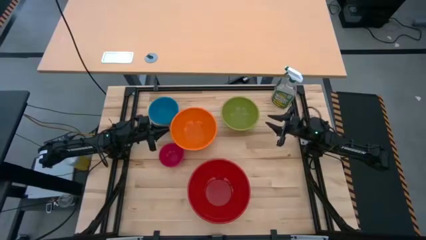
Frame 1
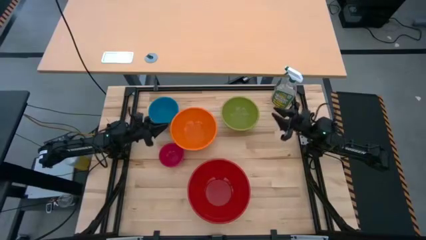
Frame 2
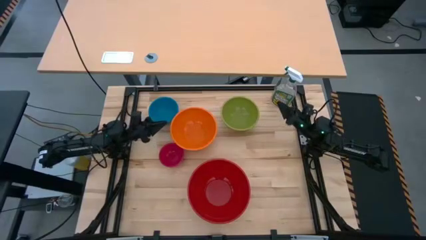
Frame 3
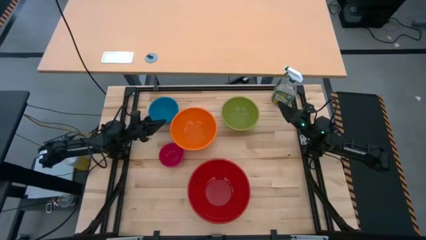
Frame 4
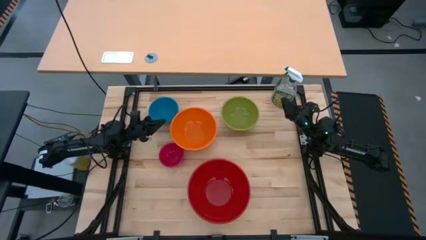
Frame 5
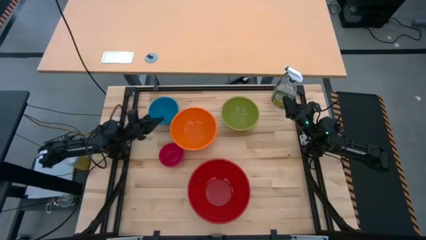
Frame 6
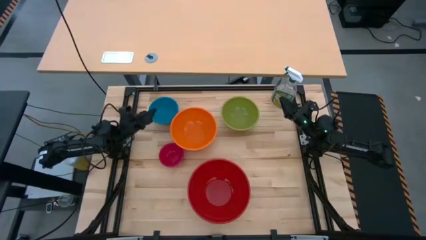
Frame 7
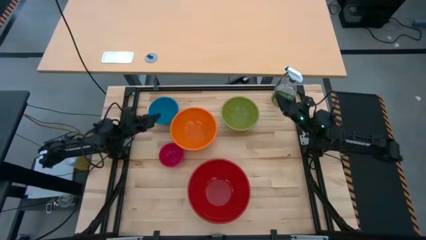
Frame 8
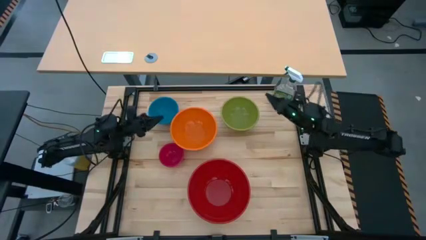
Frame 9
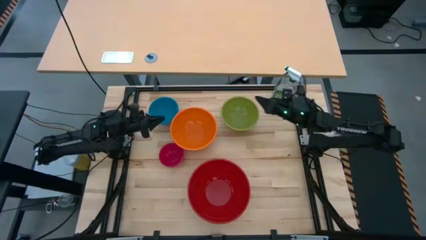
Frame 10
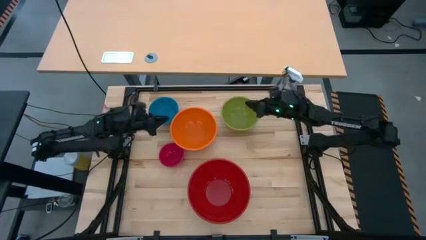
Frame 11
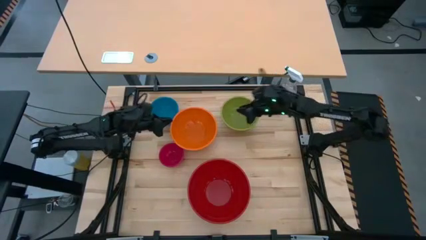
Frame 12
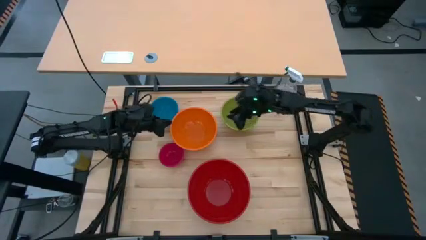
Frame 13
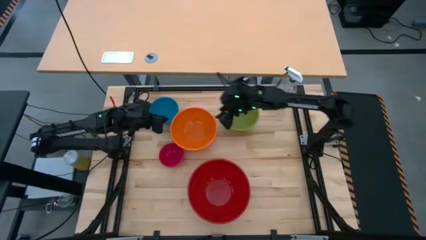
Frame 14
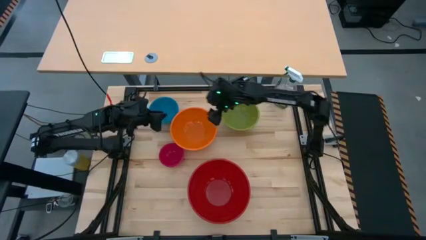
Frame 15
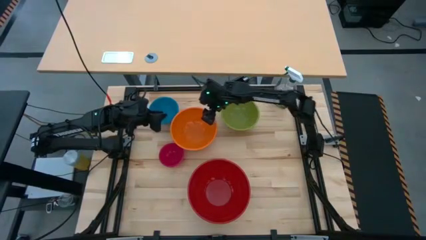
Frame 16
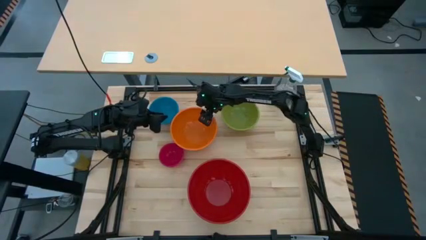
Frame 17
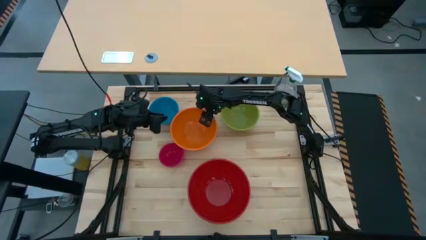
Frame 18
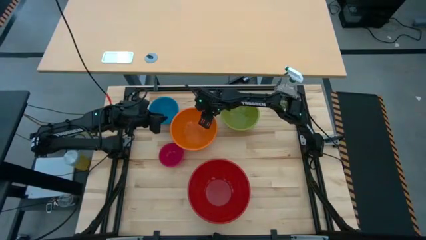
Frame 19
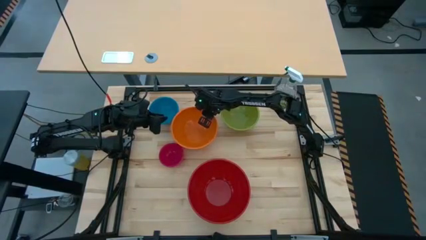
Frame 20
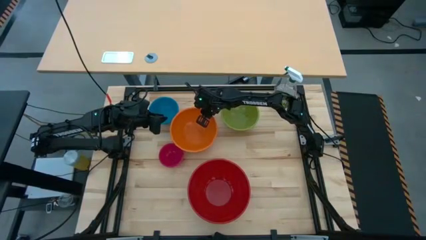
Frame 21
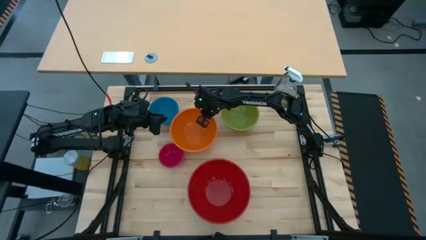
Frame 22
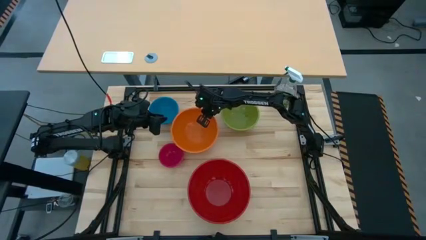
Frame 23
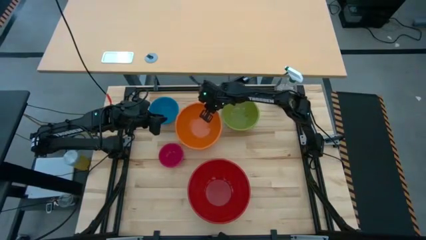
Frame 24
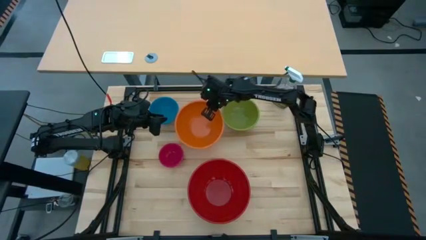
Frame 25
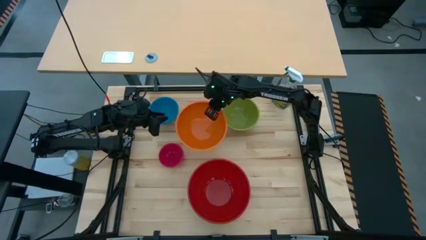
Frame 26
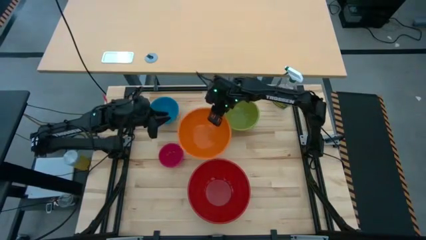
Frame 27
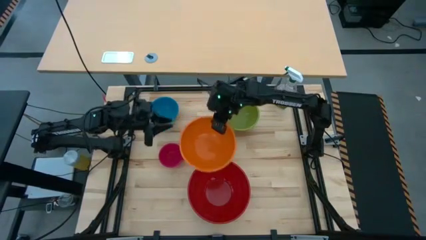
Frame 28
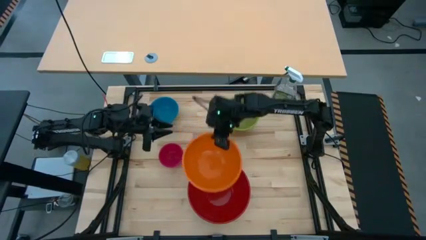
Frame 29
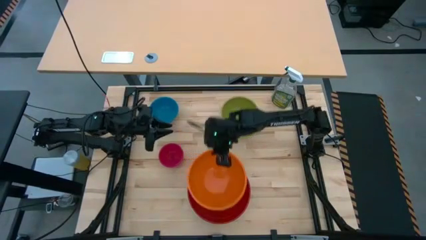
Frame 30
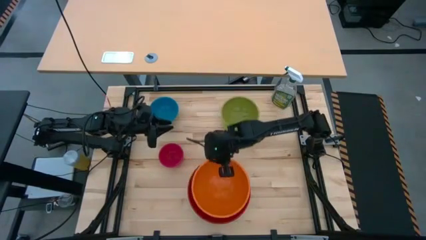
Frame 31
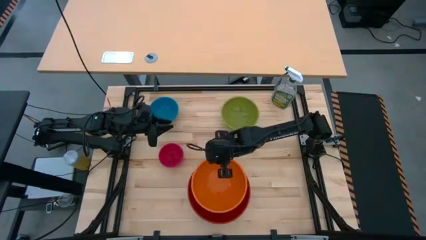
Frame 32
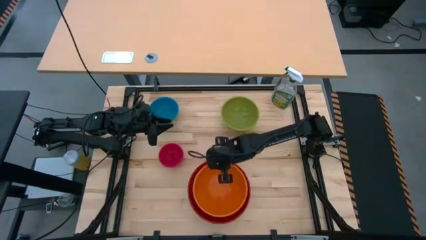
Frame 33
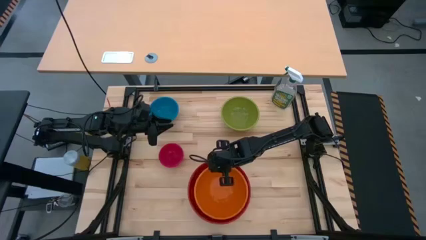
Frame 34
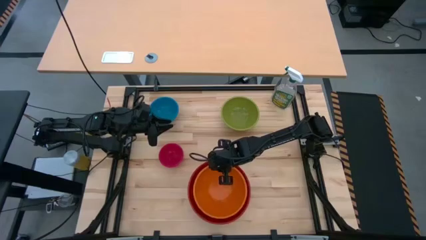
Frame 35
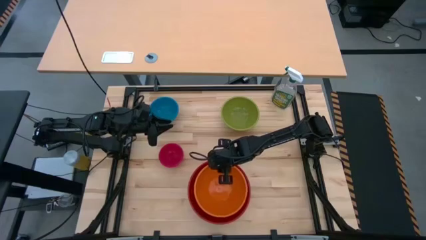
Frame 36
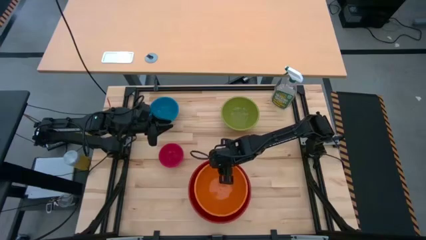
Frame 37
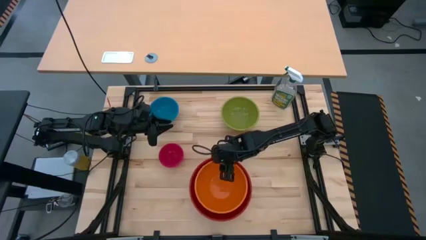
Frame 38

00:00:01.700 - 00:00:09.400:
Stack the orange bowl on top of the red bowl

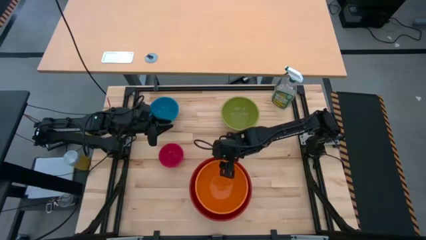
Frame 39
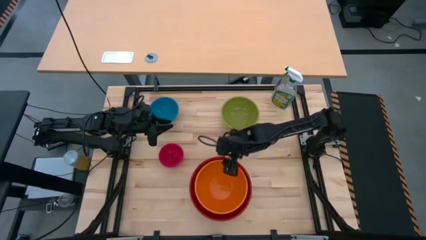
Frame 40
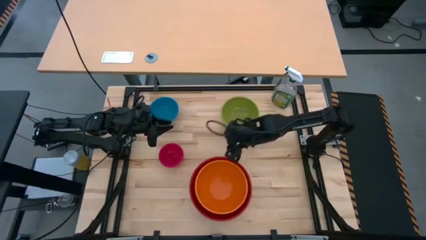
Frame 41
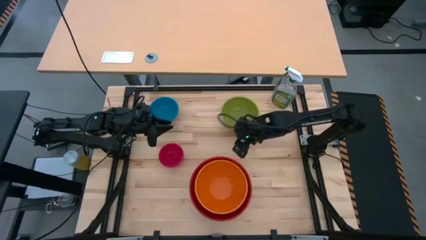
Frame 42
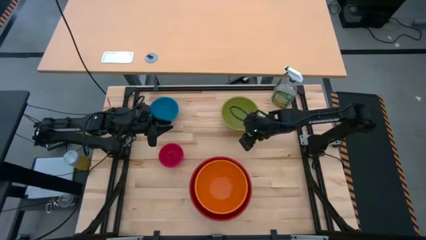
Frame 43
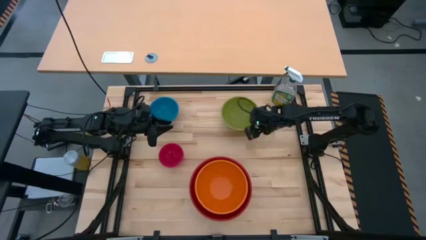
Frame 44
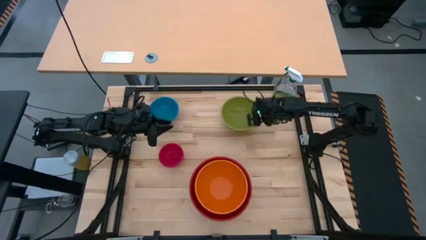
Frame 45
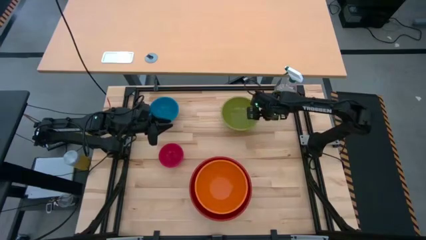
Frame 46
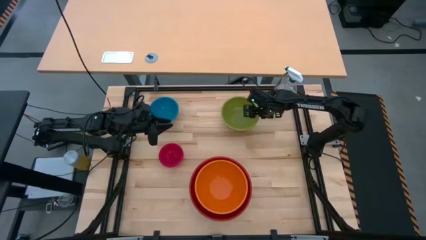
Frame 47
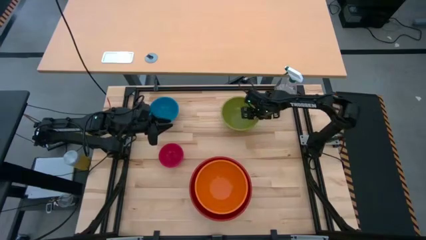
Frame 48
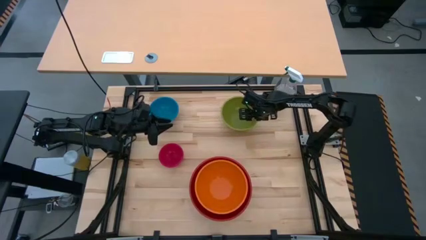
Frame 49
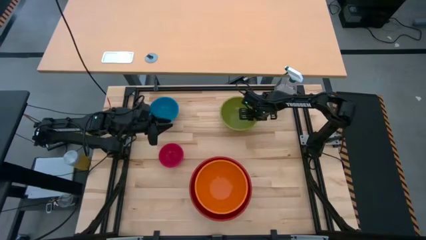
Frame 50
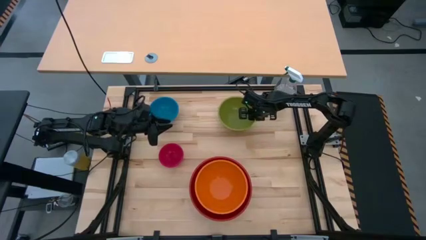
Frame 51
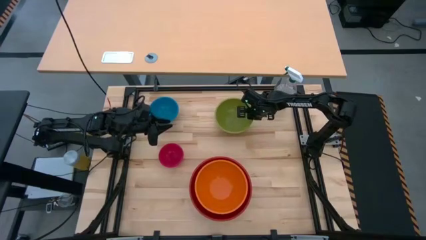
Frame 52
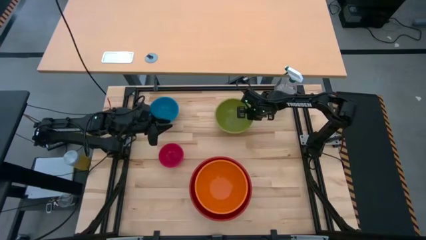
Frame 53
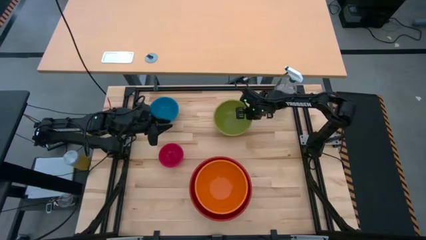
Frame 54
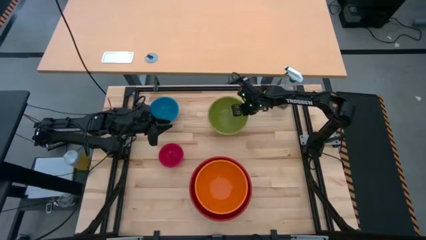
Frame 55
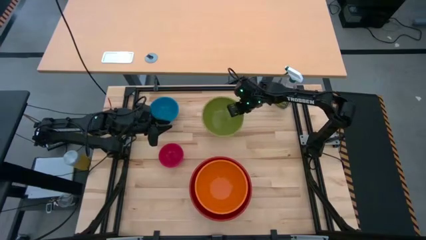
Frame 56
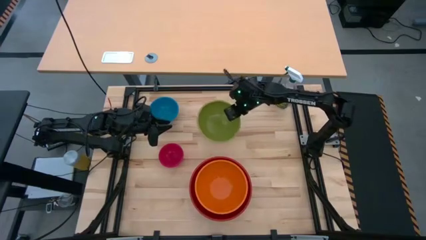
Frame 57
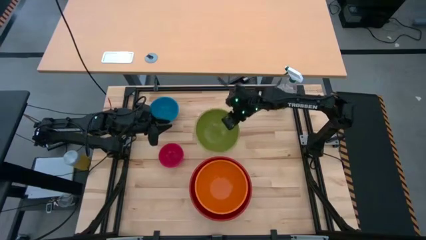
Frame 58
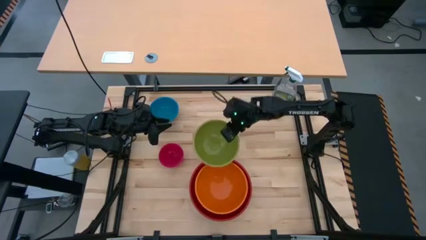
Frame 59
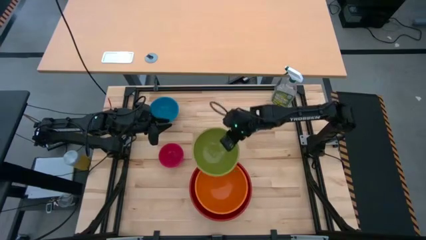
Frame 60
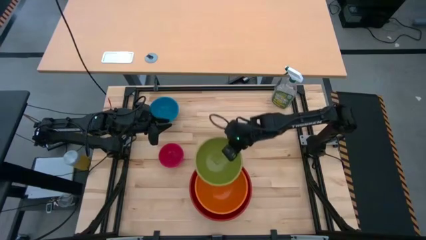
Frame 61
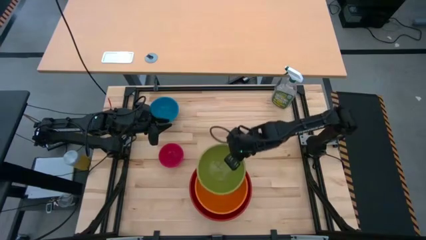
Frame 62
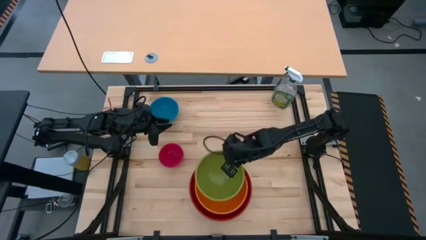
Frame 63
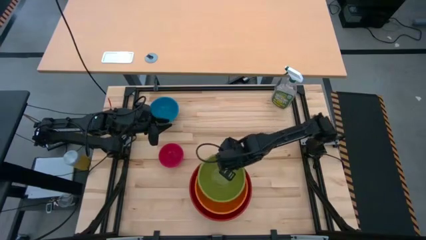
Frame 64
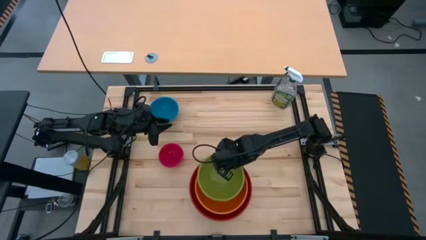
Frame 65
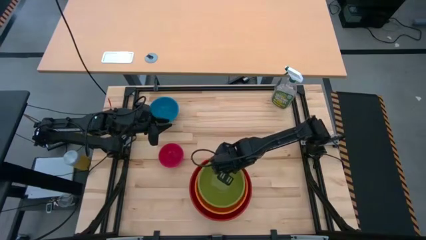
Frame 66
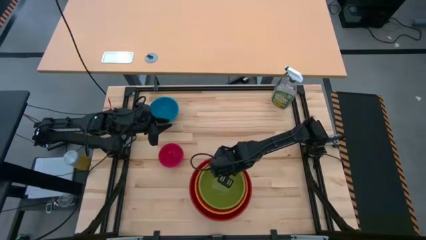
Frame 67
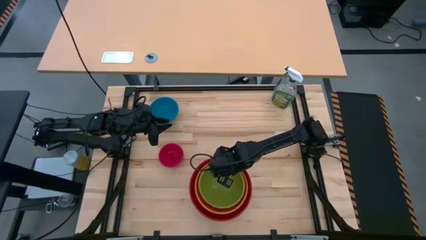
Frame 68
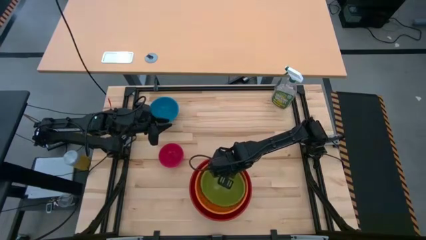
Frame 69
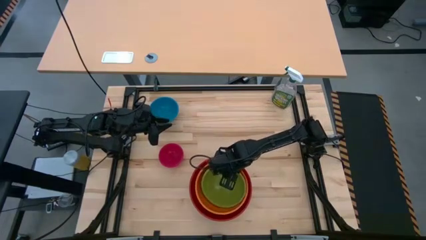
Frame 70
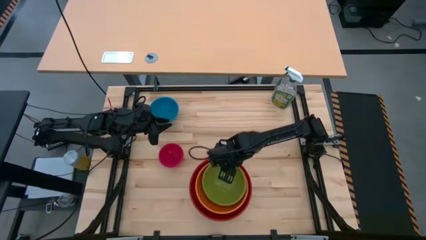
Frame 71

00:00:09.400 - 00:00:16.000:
Stack the green bowl on top of the orange bowl
